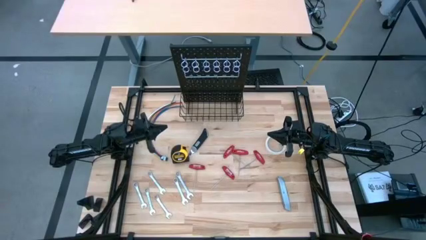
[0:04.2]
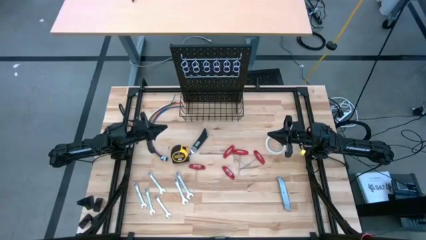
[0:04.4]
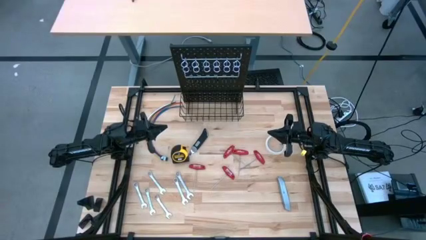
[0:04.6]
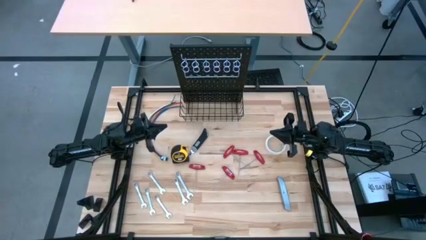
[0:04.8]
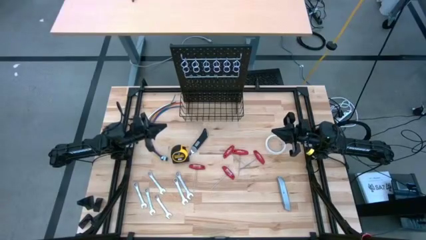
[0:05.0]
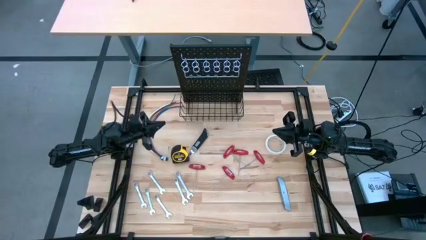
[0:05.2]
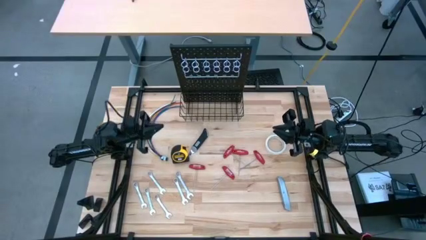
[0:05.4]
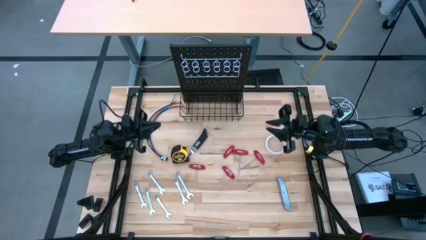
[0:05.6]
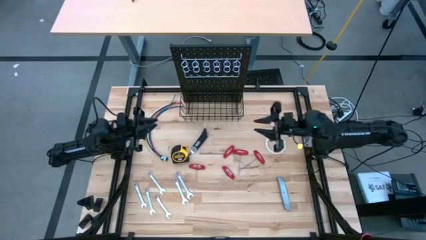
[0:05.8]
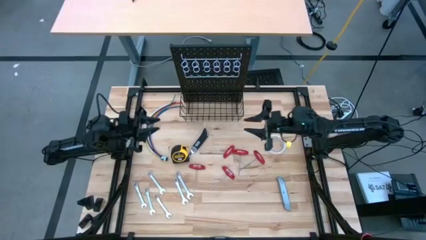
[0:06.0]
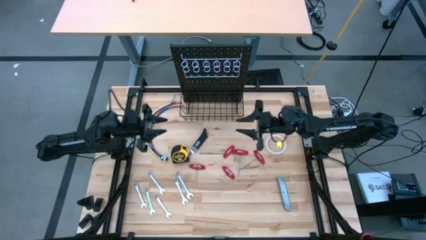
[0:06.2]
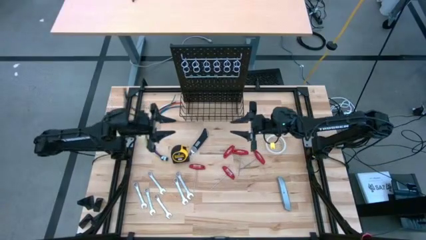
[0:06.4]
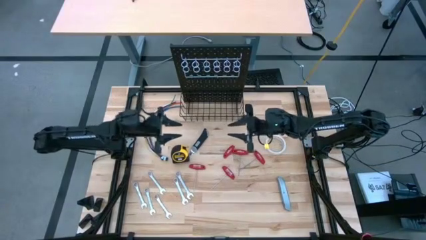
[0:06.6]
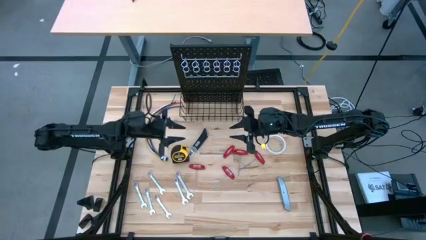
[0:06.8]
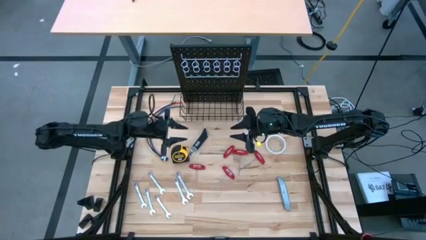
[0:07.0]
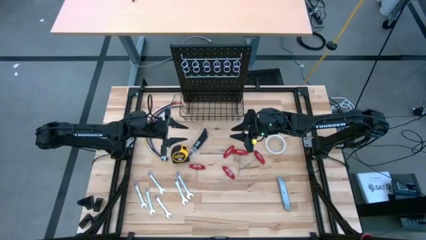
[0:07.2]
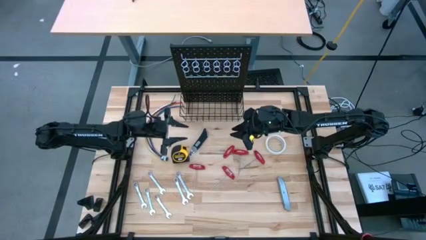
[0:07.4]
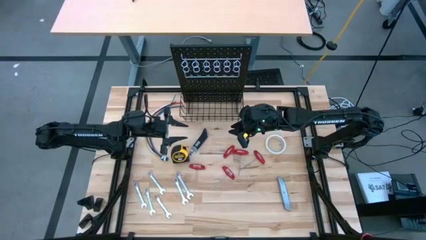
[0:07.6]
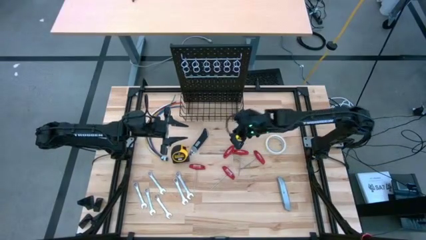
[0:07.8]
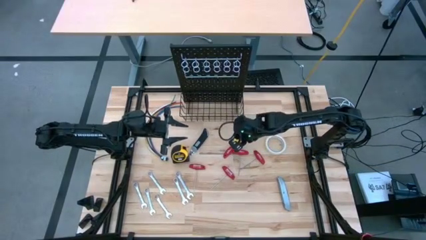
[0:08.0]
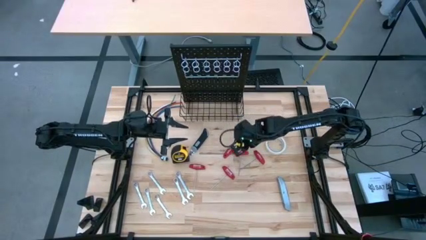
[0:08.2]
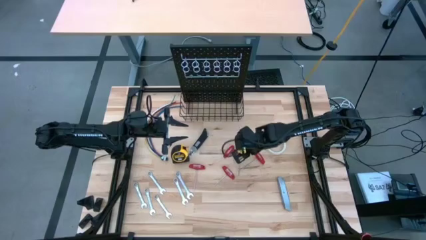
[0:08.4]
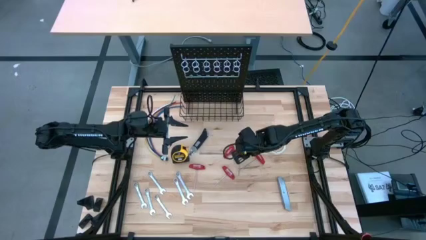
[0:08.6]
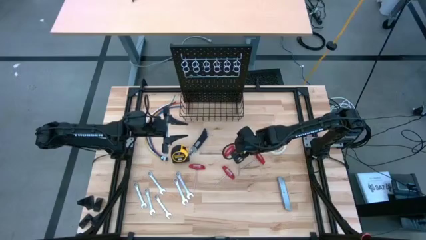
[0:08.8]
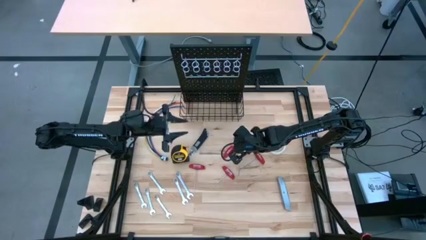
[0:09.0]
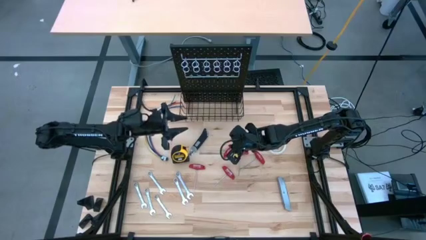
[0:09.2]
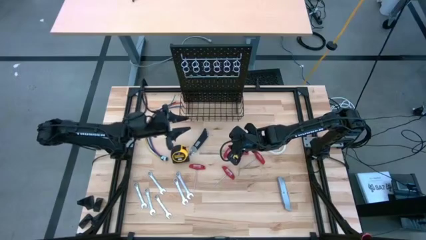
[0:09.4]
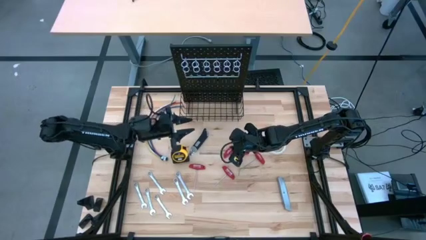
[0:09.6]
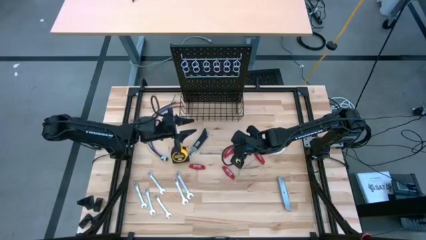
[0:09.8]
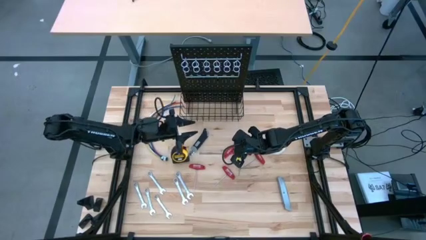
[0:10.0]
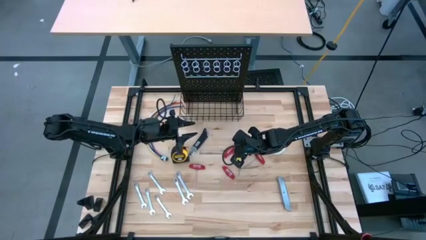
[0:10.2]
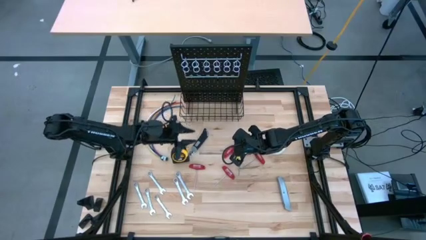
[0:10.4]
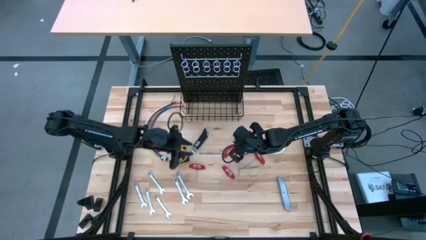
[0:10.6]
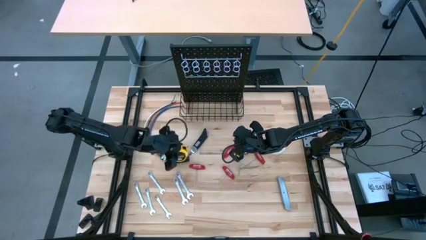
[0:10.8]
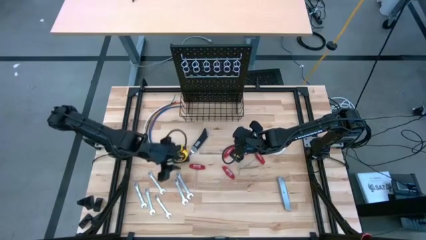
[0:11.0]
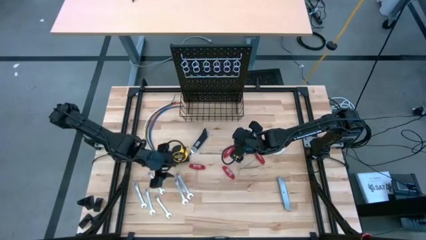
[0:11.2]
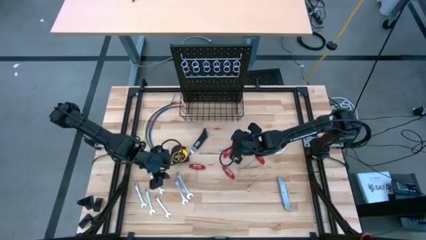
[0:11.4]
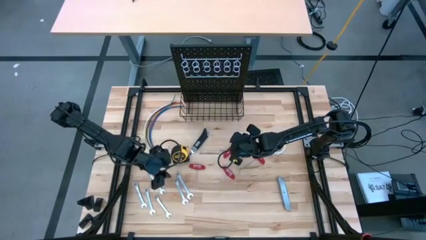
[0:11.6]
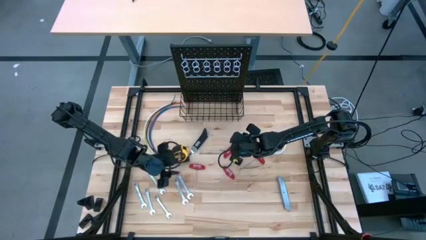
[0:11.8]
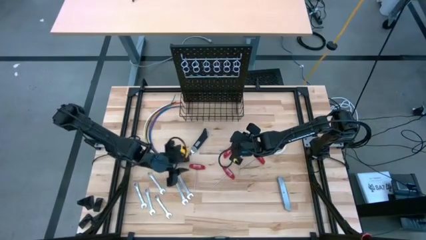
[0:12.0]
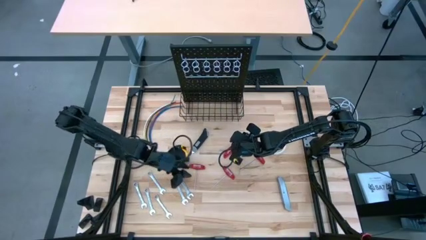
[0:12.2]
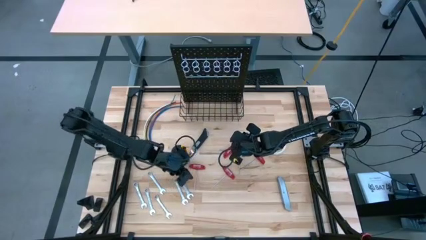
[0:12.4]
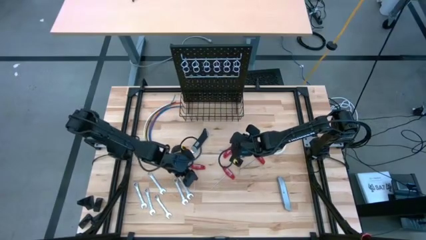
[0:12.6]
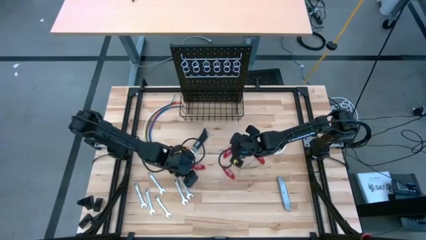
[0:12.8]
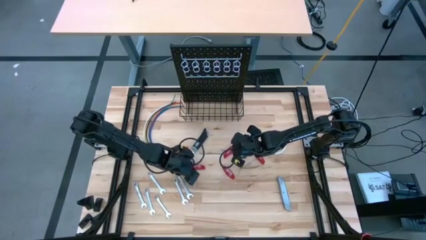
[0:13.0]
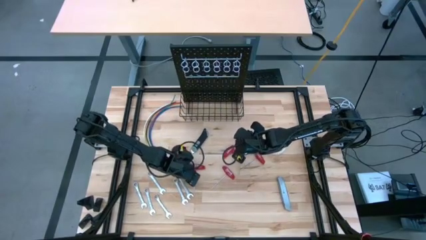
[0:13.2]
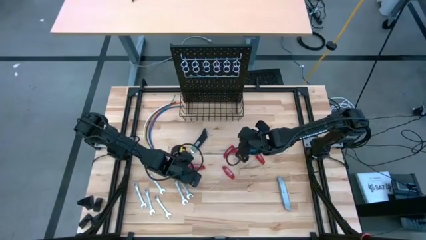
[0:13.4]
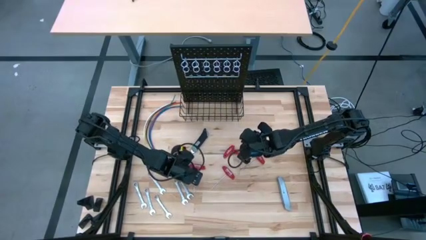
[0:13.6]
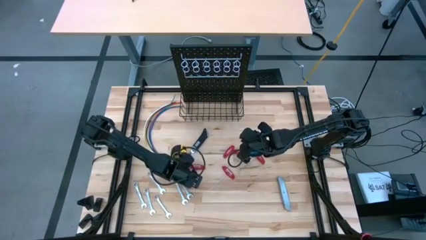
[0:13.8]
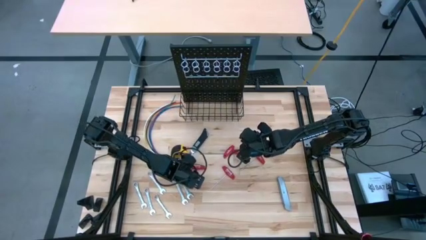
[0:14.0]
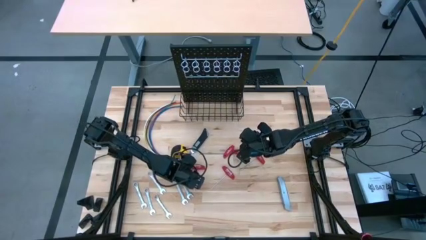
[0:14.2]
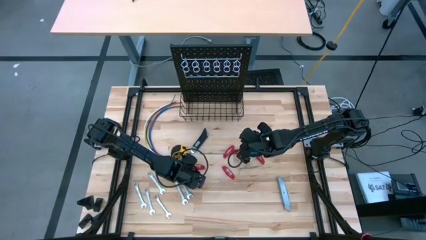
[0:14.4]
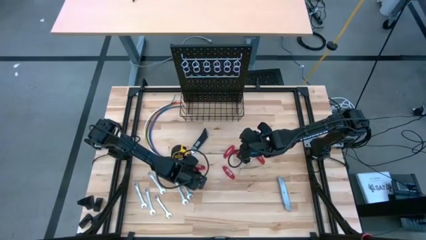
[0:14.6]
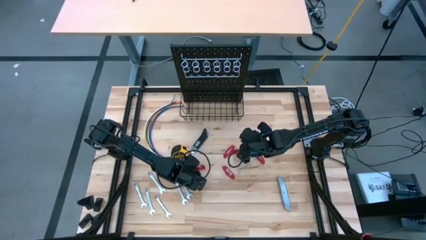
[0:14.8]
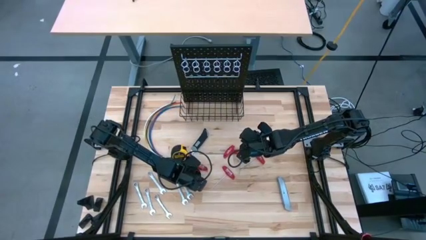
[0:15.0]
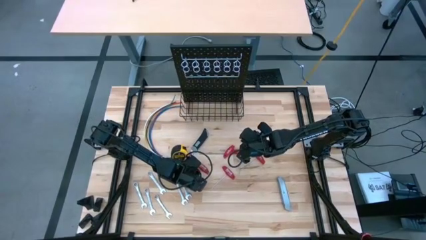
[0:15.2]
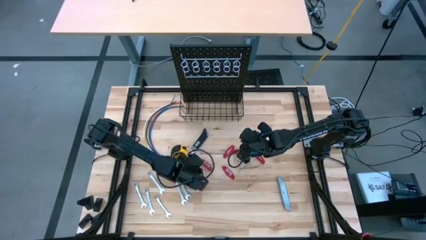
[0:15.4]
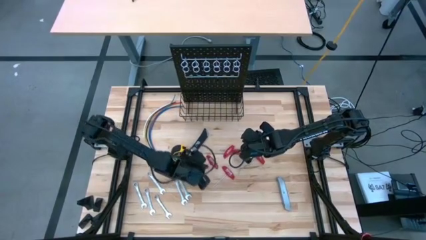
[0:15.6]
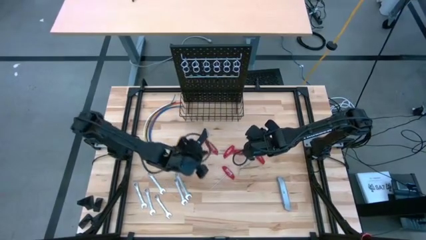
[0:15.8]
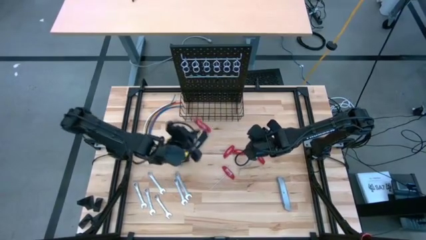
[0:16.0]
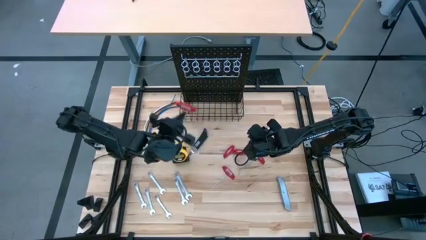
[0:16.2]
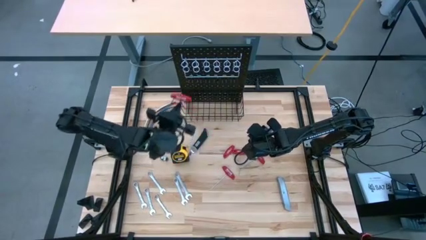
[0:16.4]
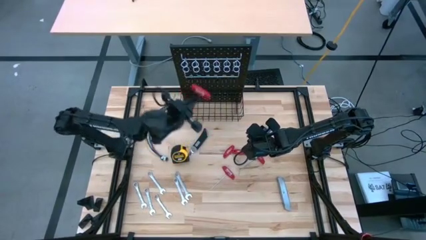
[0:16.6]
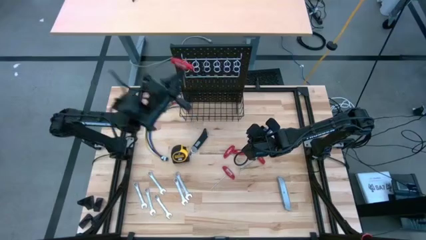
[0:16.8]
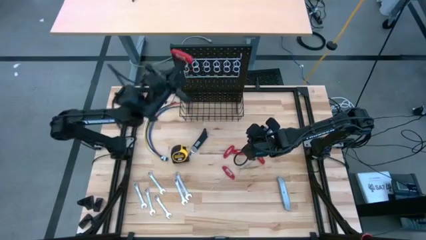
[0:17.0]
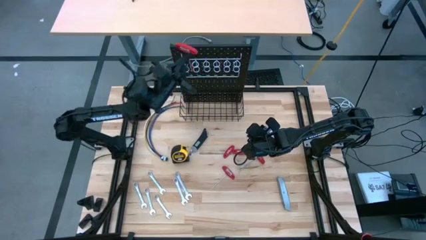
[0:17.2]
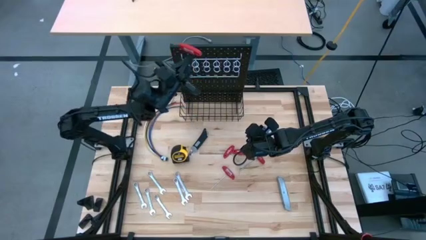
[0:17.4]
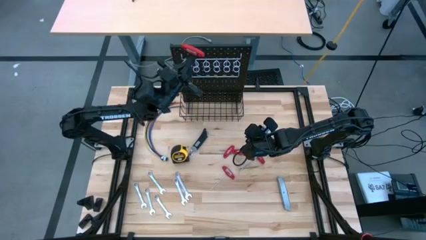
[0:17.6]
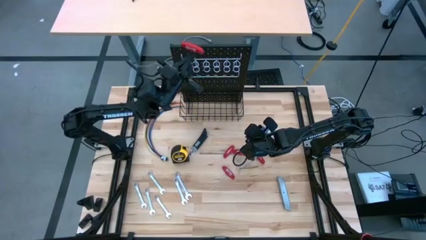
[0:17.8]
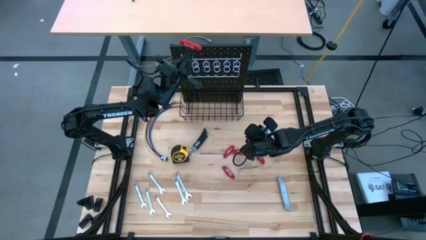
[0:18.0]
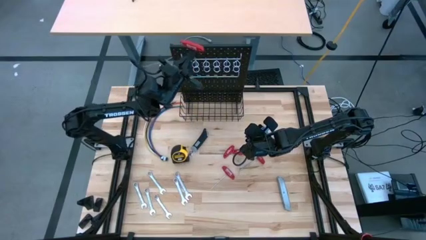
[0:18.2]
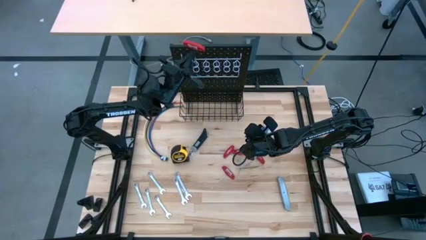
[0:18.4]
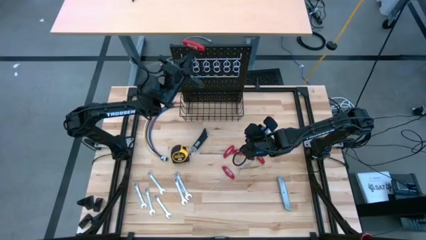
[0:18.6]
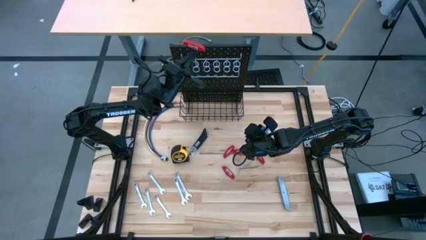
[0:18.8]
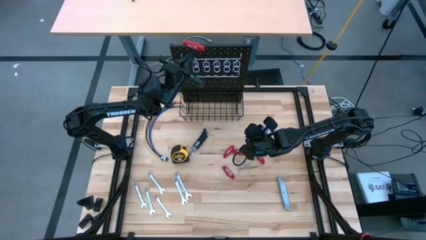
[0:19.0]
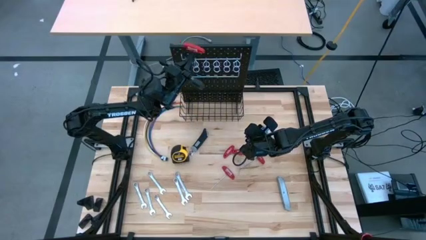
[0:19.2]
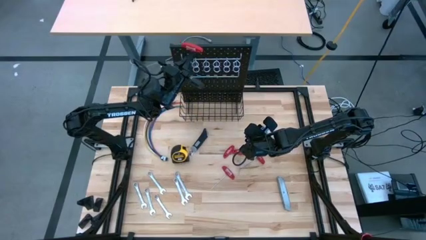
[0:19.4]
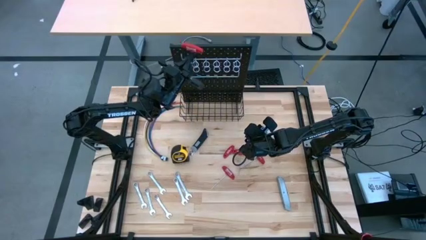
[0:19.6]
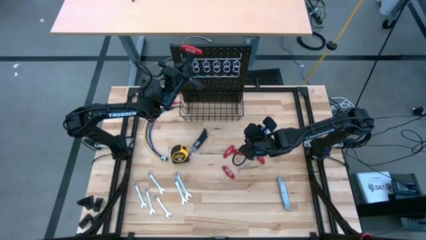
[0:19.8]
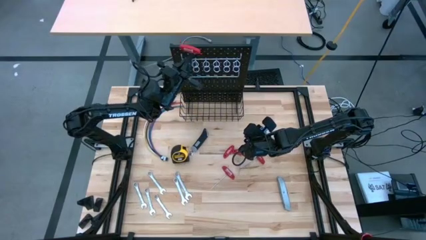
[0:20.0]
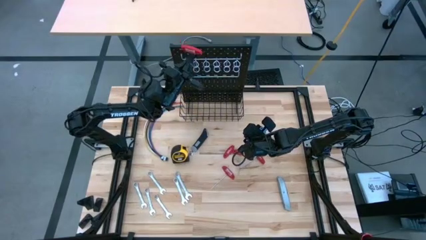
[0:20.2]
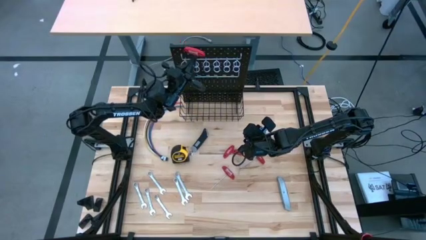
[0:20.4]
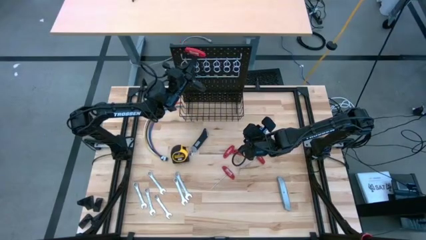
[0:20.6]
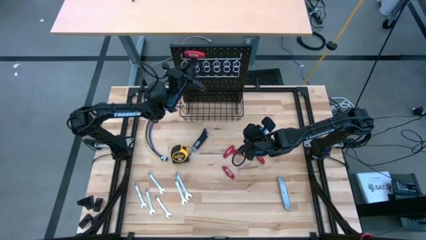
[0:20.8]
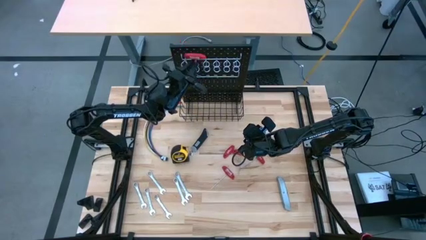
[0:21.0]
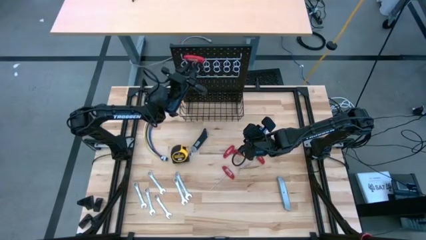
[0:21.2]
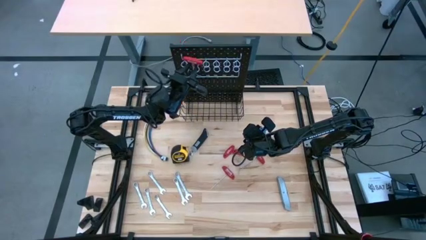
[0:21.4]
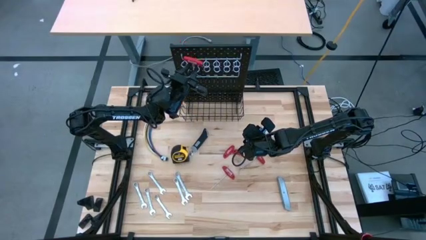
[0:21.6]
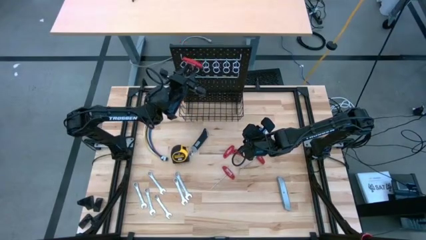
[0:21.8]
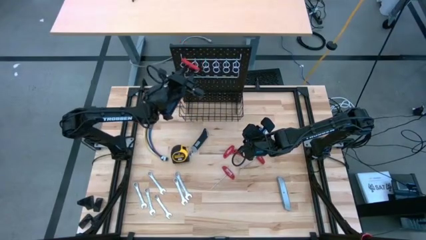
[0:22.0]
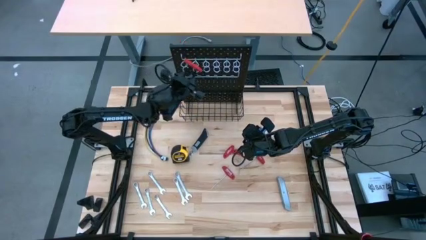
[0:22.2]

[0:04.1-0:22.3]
Task: Hang tools onto peg board
Hang the allen wrench on the peg board
